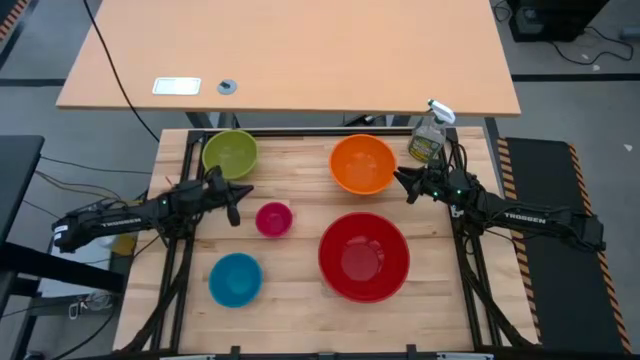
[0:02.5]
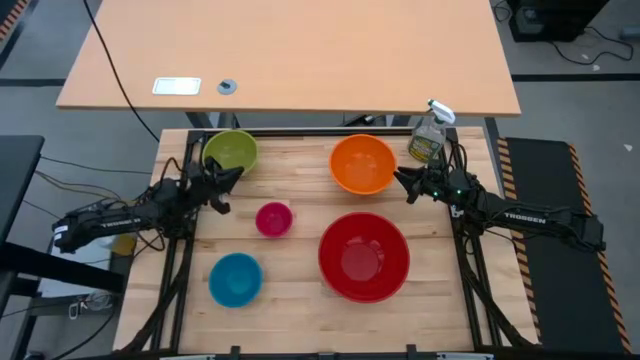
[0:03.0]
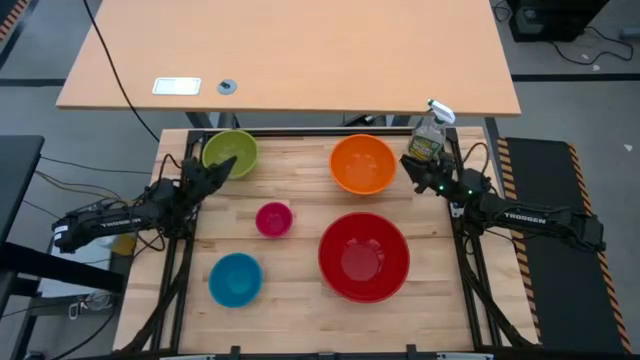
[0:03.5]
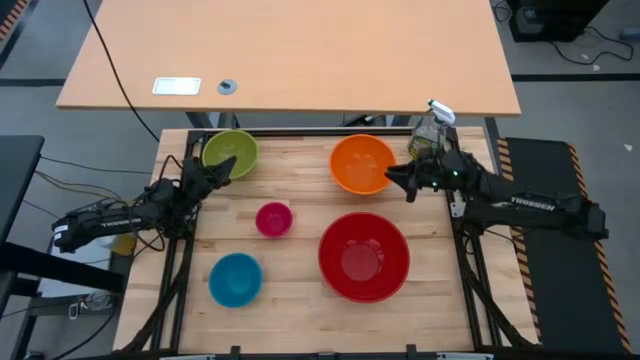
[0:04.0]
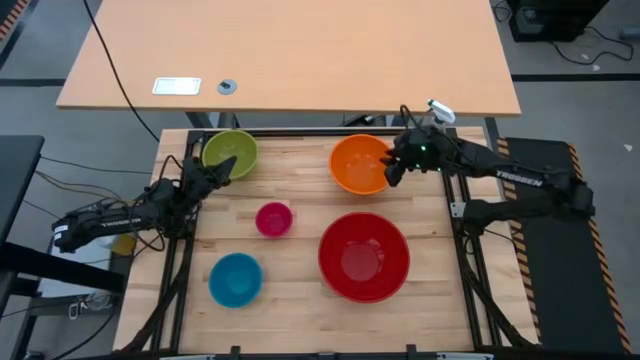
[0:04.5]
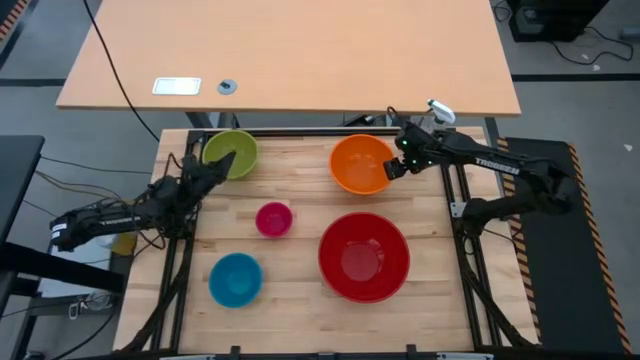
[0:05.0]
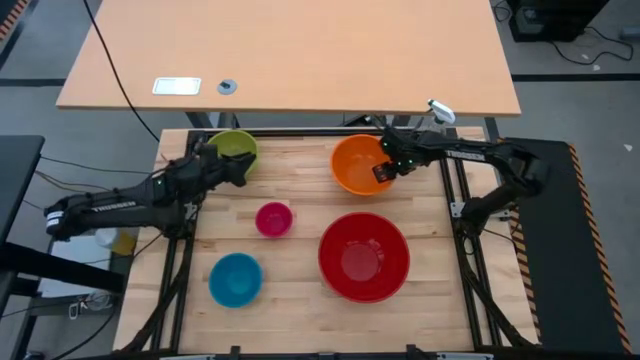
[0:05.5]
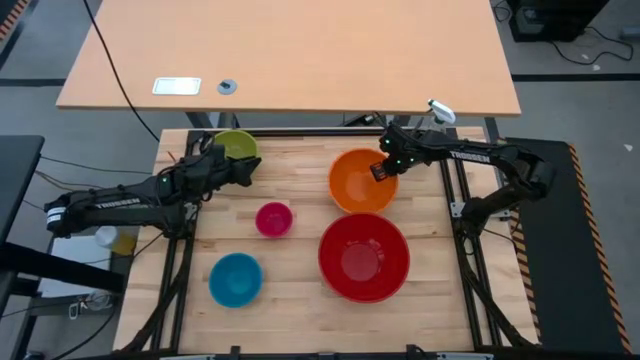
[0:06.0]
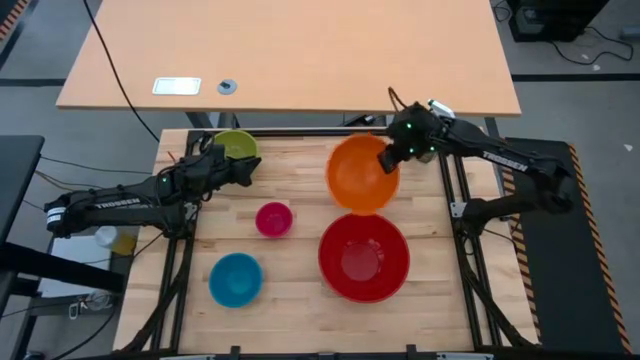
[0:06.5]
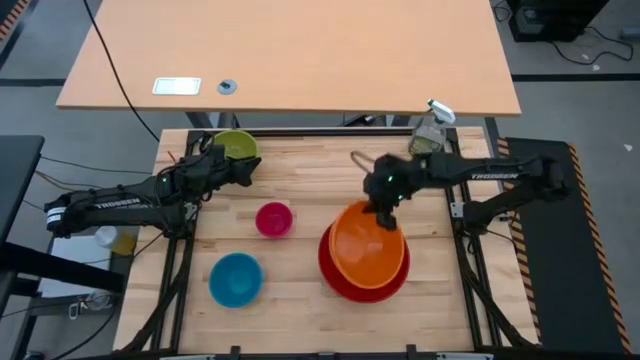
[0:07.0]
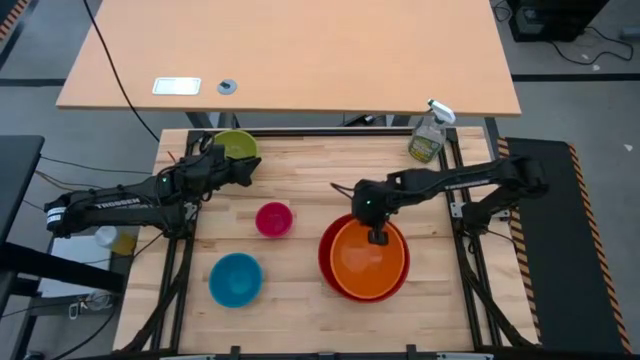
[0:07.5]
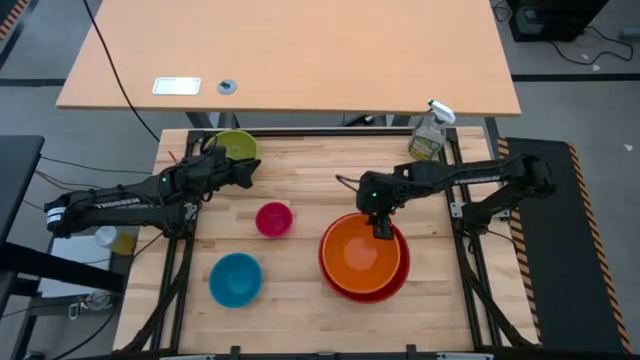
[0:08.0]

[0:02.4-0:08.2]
Stack the orange bowl on top of the red bowl

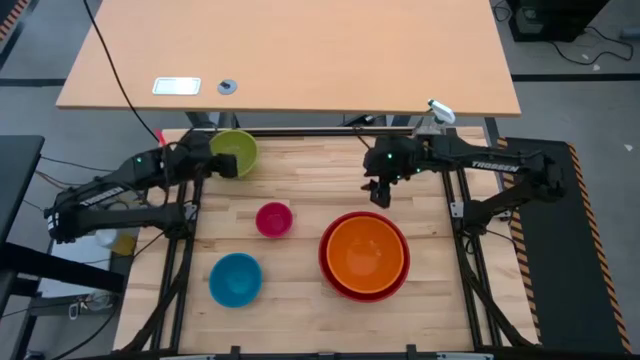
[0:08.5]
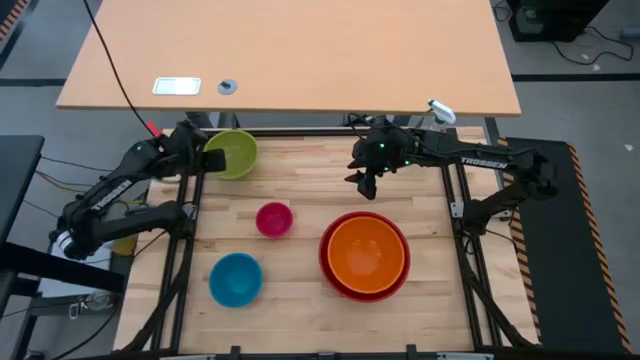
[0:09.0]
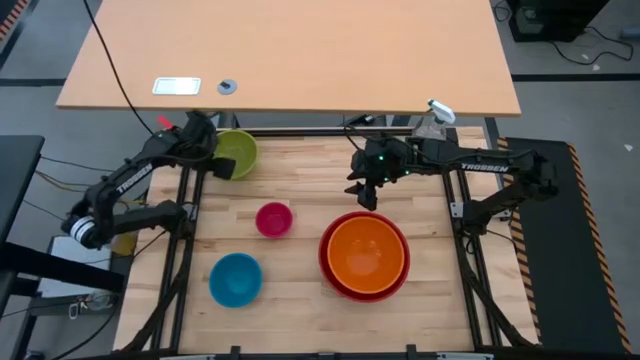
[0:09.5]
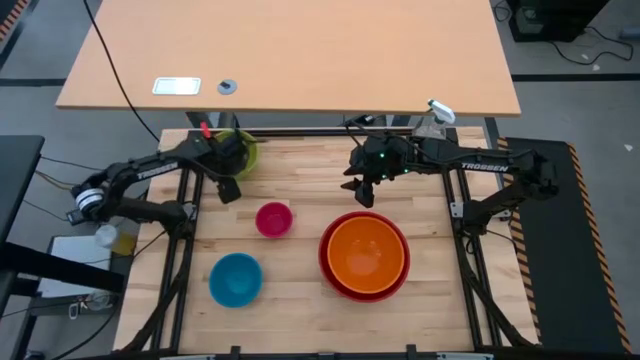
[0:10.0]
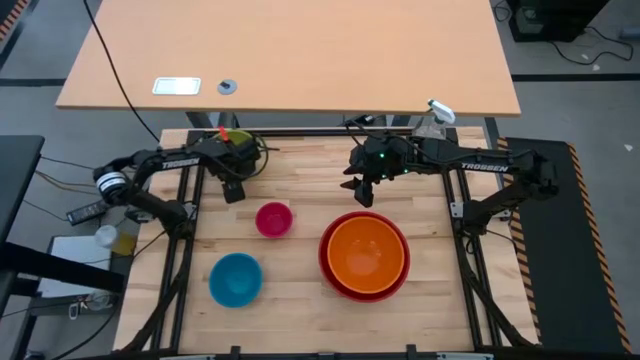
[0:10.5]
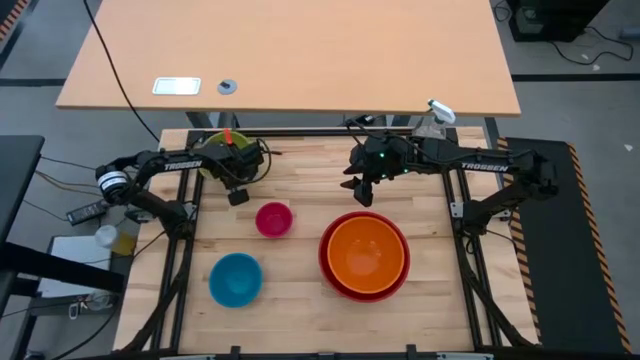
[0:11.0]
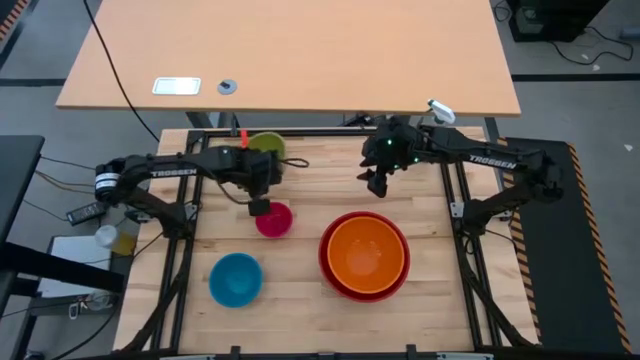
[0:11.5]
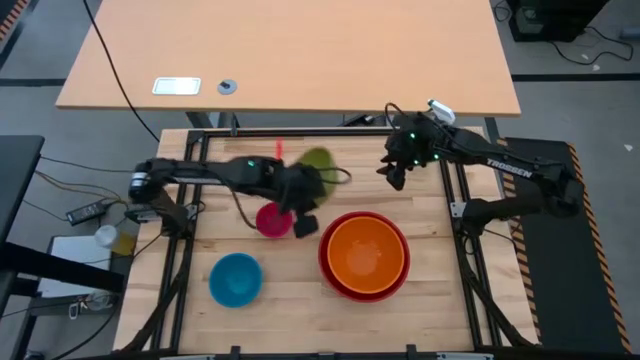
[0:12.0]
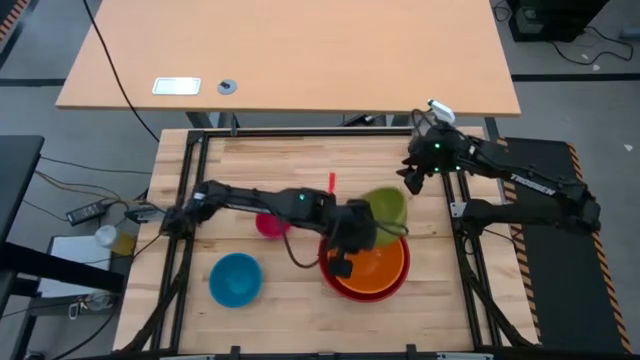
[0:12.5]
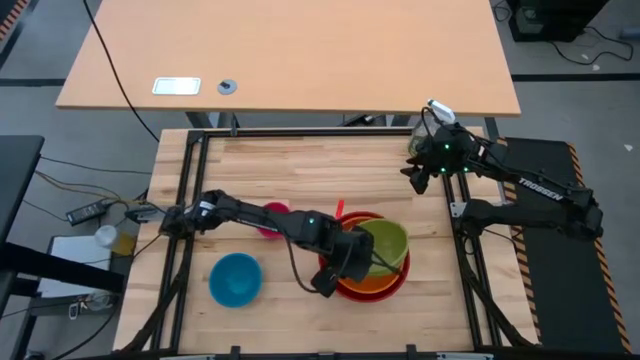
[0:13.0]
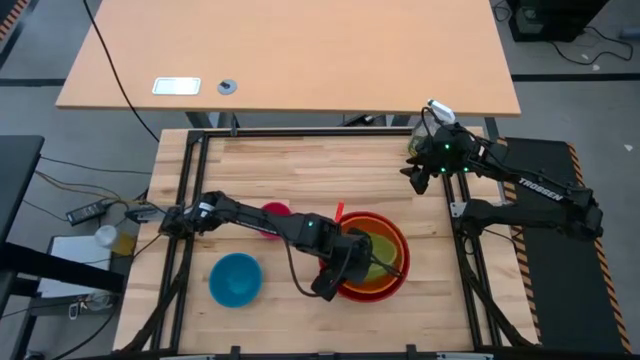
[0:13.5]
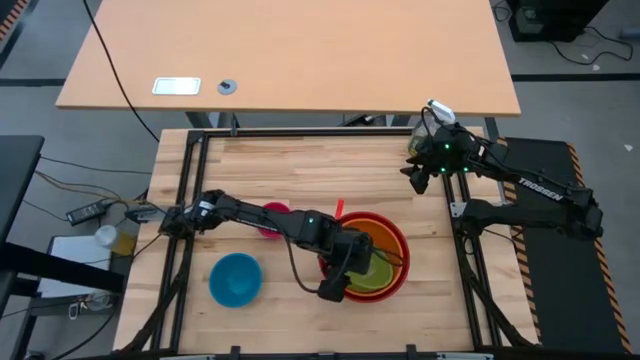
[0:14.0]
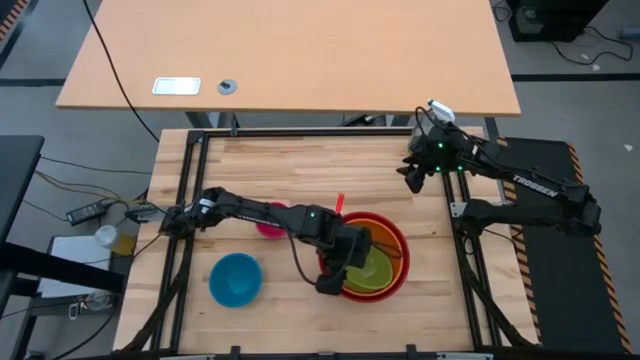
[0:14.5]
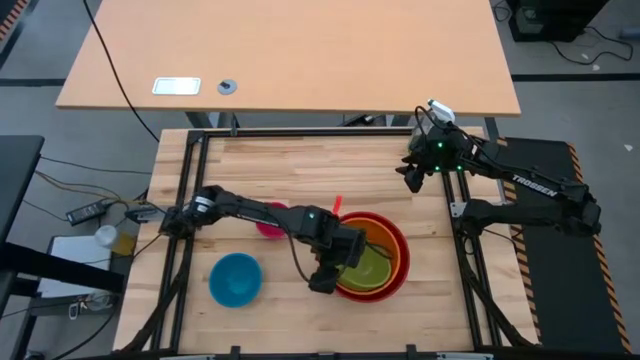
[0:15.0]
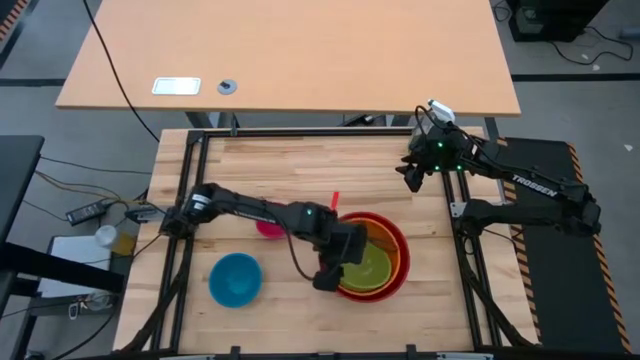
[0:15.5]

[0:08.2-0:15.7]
Stack the green bowl on top of the orange bowl

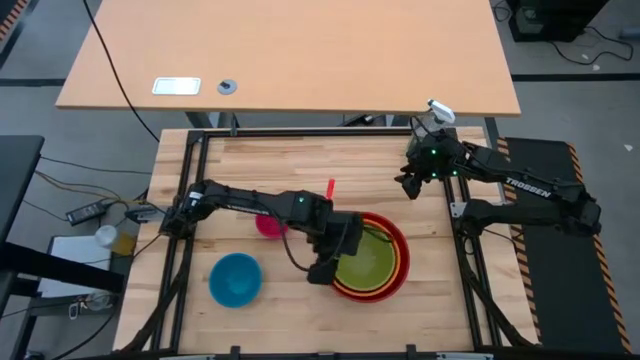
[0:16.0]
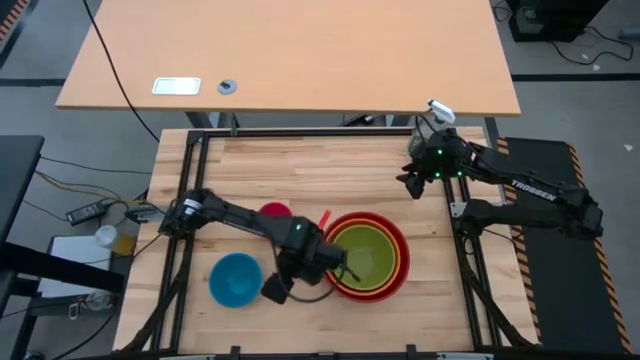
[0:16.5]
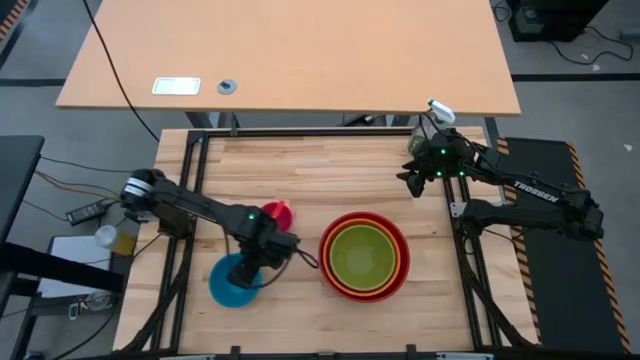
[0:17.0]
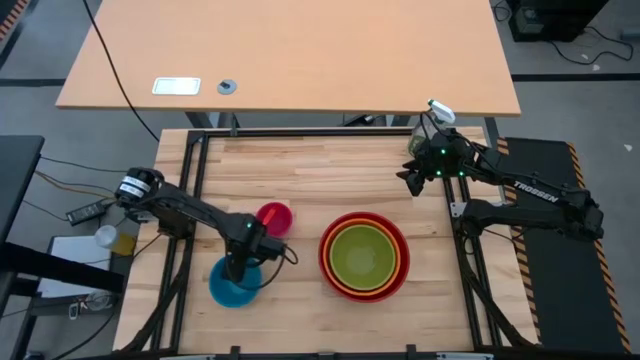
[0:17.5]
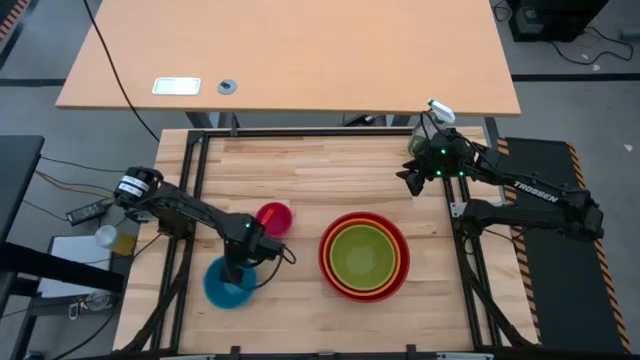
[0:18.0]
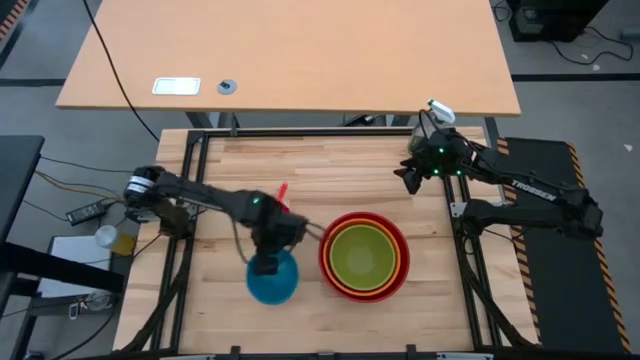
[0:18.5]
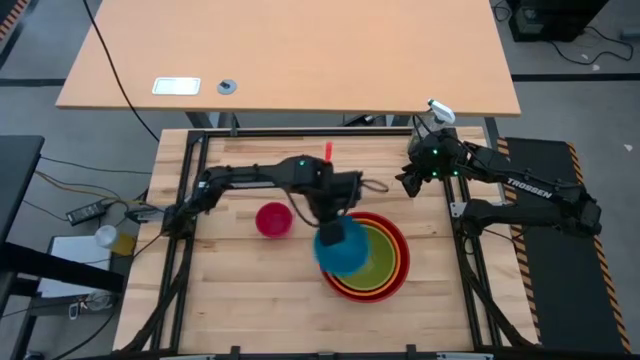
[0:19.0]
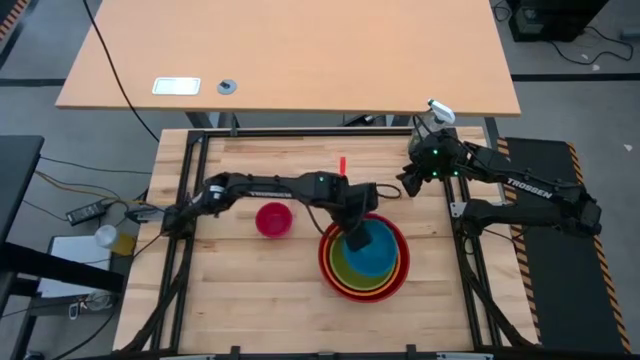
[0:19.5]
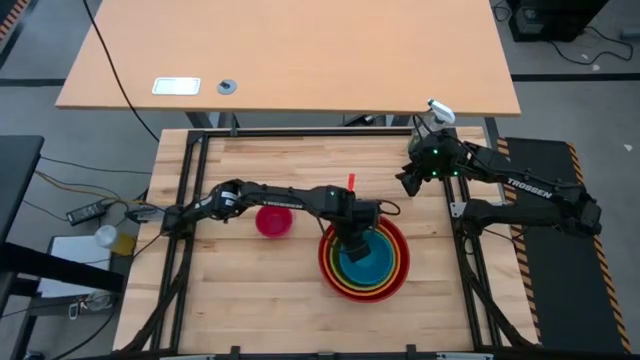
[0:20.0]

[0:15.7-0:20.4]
Stack the blue bowl on top of the green bowl

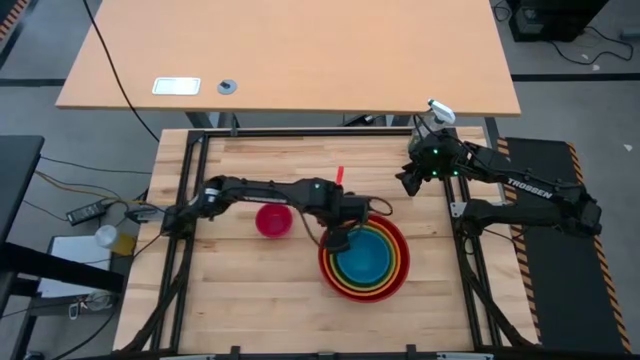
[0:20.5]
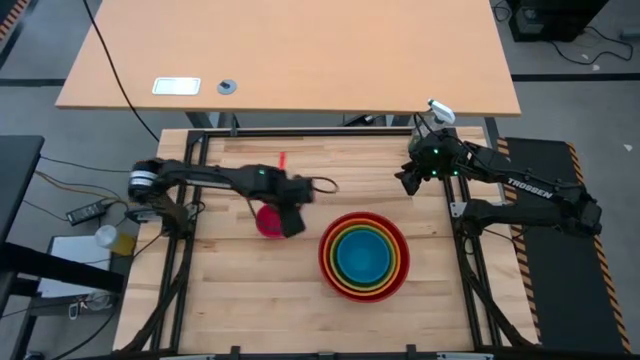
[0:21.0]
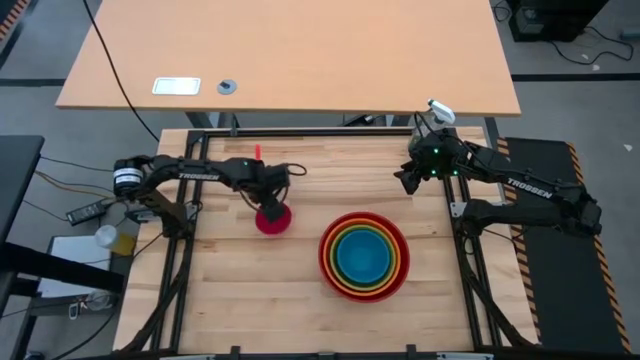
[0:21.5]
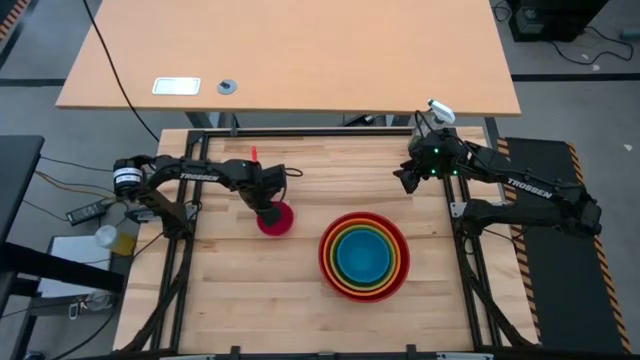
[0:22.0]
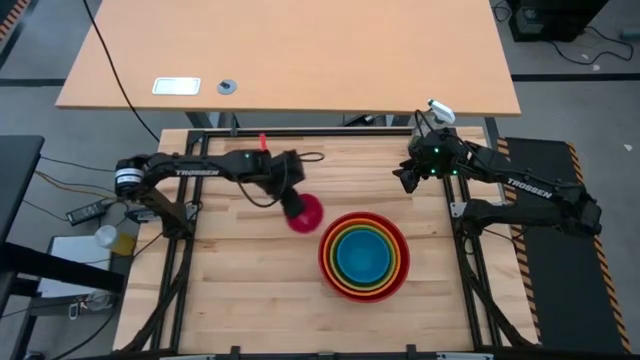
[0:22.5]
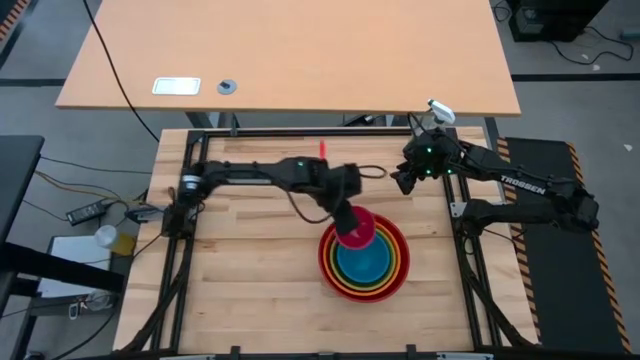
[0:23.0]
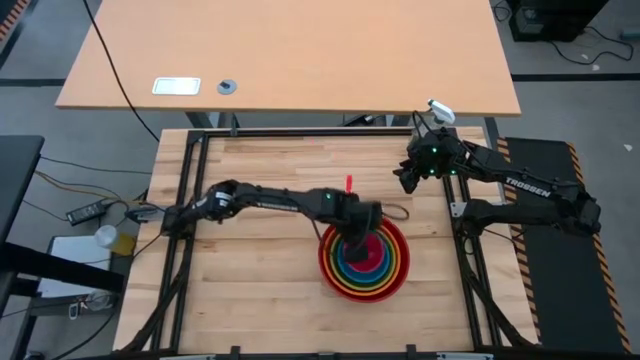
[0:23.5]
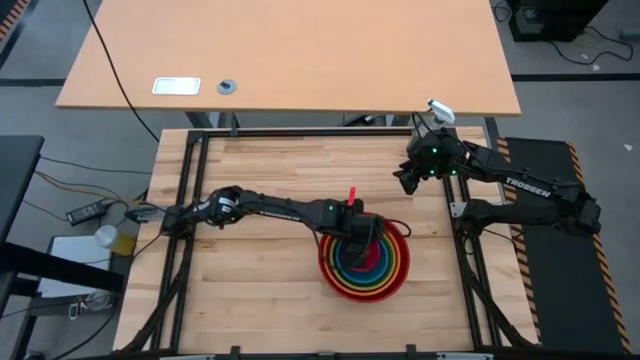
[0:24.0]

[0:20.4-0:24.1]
Stack the pink bowl on top of the blue bowl
